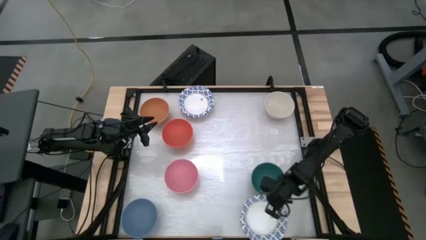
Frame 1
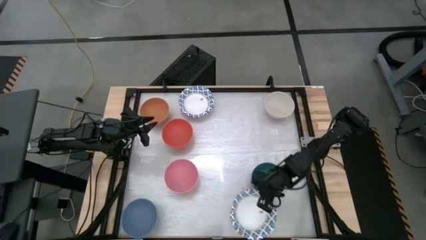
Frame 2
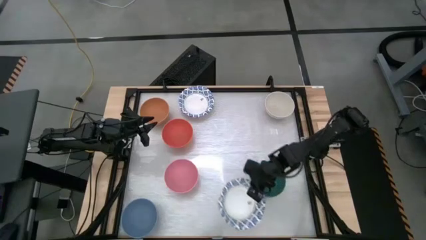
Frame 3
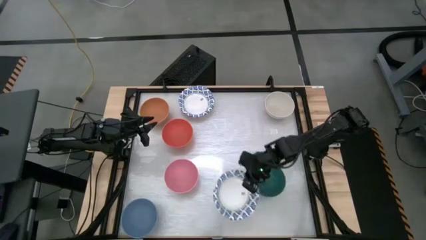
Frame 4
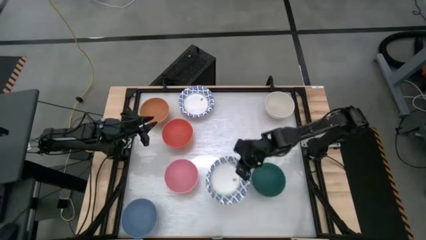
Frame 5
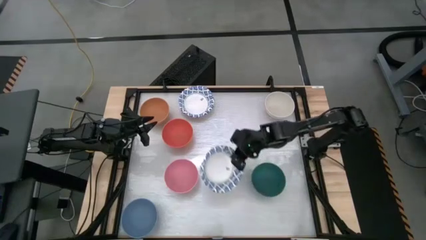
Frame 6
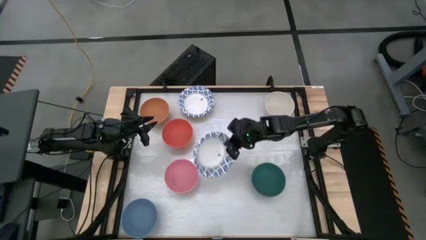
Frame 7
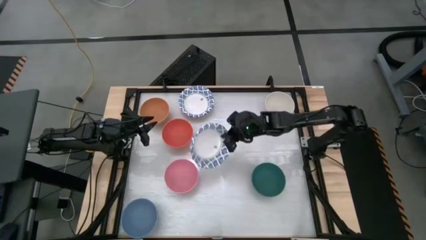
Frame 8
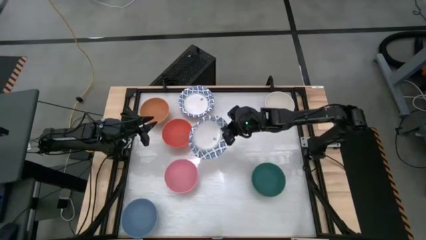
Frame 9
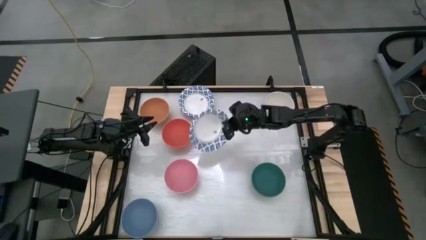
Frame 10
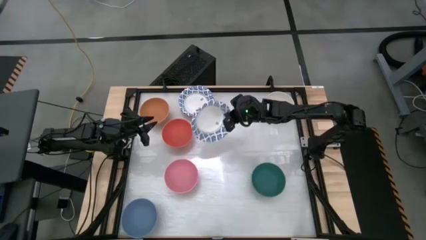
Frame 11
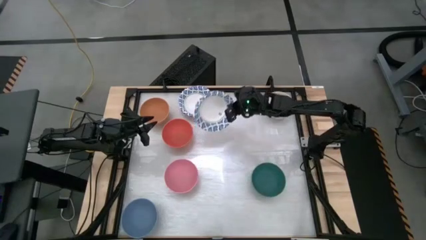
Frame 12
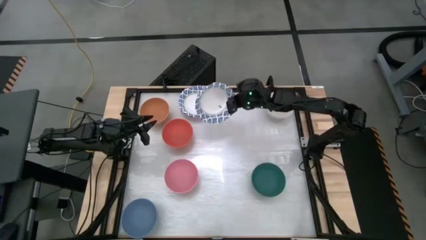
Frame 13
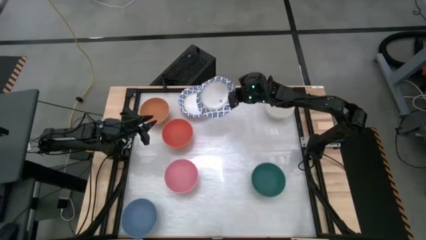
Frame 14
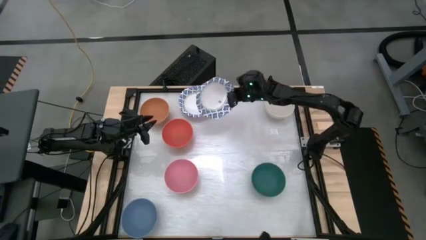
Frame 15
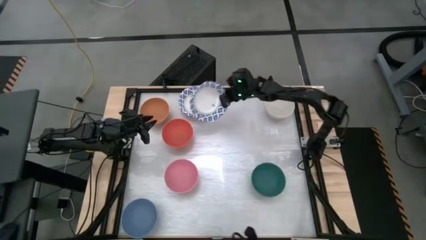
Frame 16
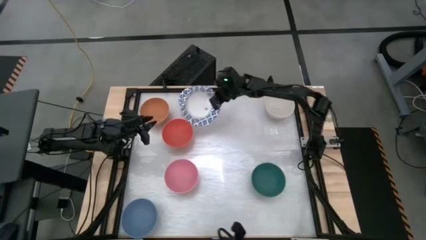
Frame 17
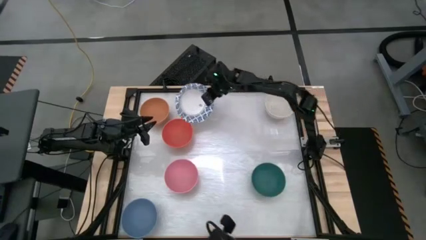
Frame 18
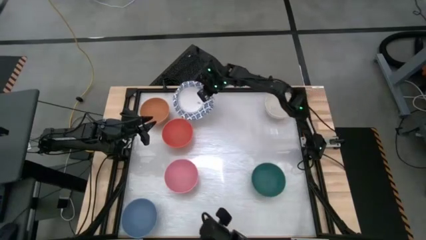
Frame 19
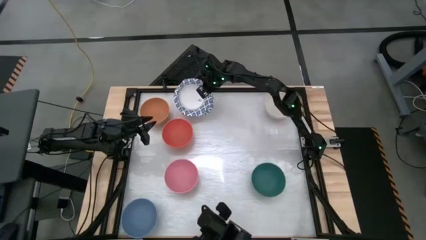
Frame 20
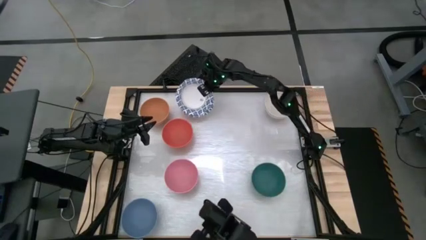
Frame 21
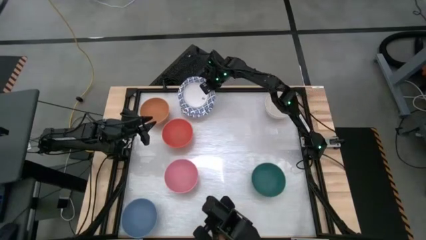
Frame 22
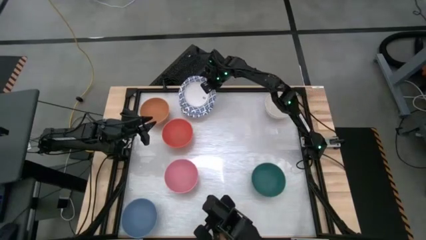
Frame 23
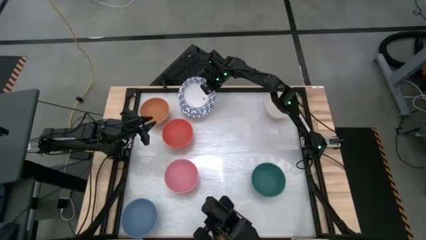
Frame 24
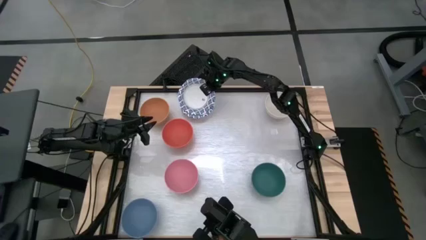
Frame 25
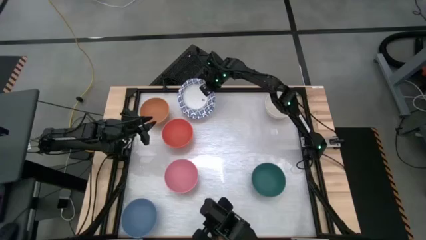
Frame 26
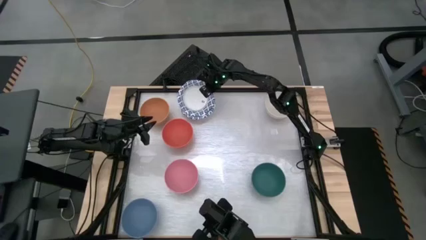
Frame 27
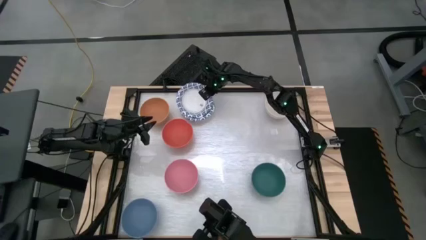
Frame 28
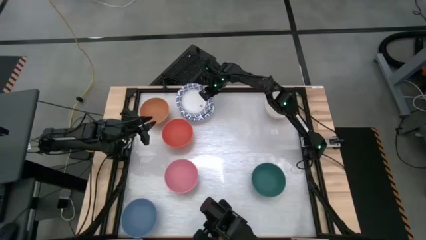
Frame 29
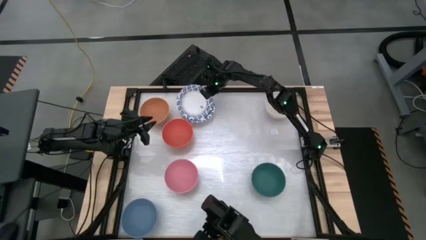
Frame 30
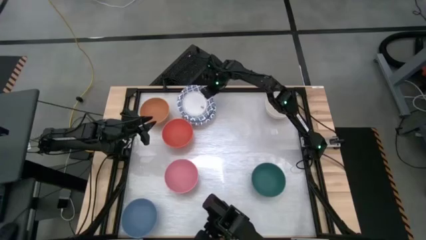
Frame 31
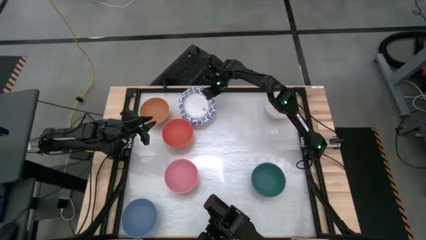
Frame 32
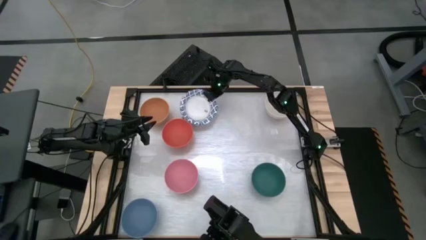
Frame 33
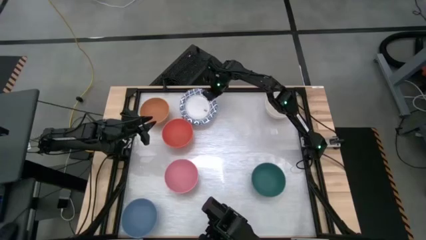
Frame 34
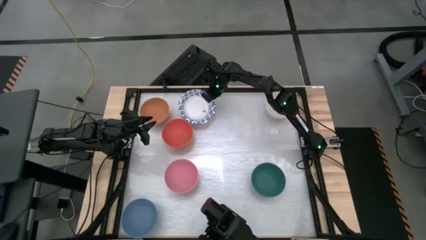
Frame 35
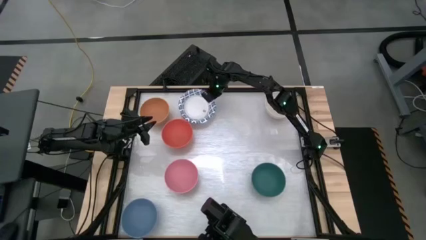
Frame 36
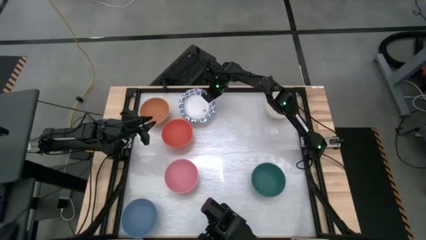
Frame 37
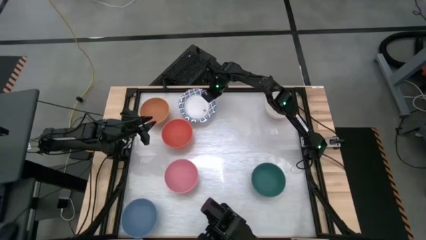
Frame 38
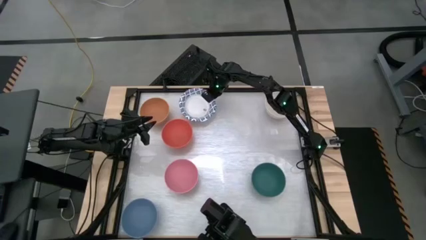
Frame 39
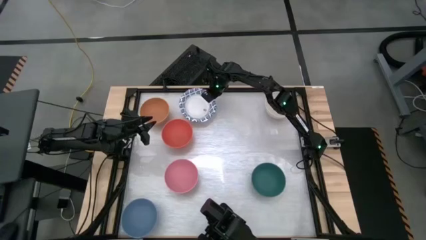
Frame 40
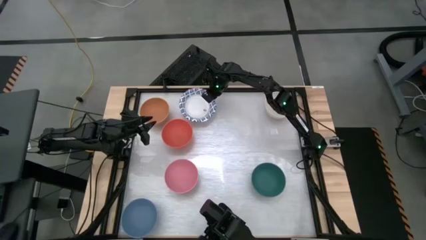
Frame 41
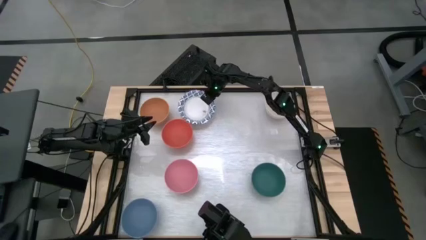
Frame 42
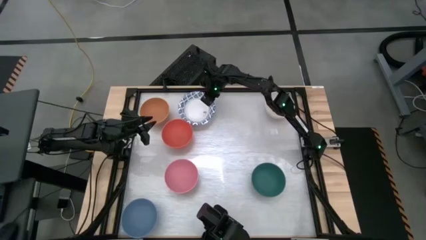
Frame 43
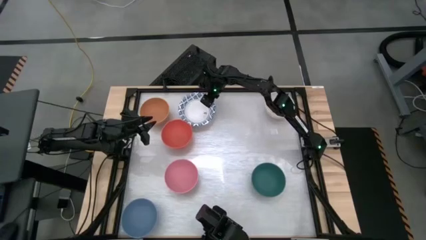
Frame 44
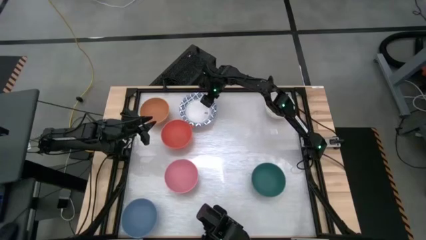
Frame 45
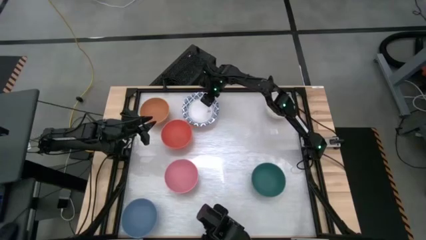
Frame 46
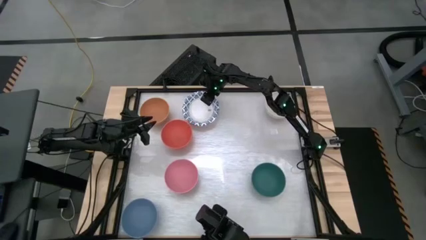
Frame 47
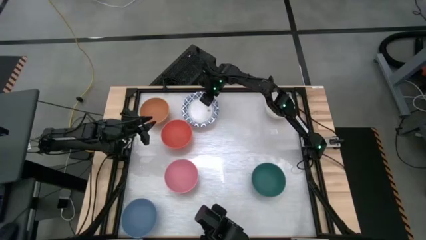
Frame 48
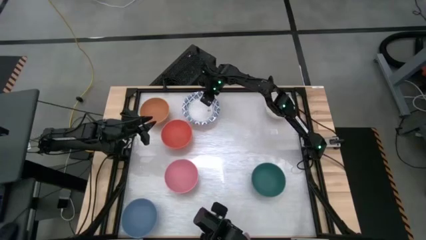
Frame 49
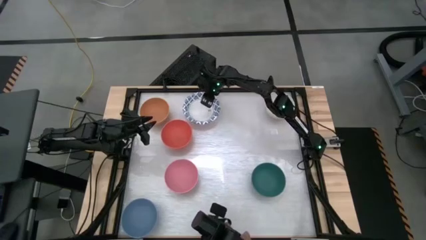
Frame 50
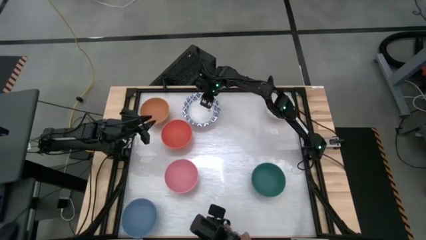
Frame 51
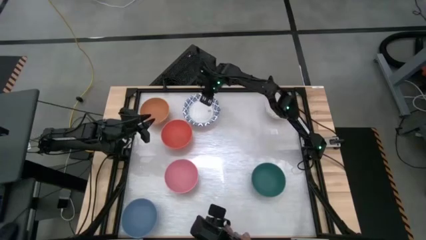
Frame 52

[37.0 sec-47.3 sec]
Stack the white pattern bowl onto the stack of bowls
